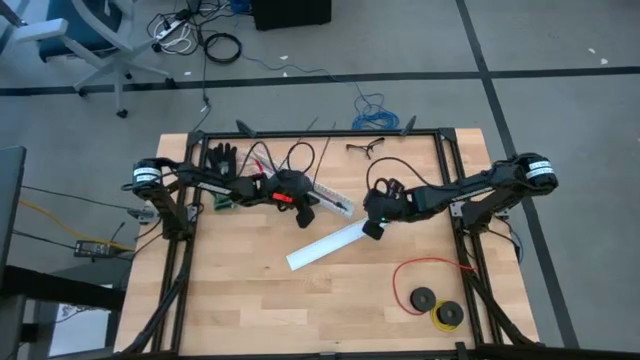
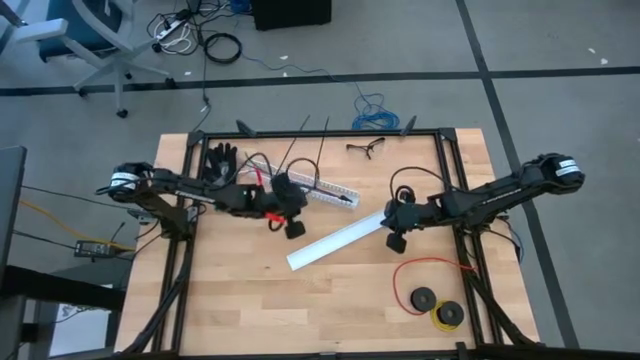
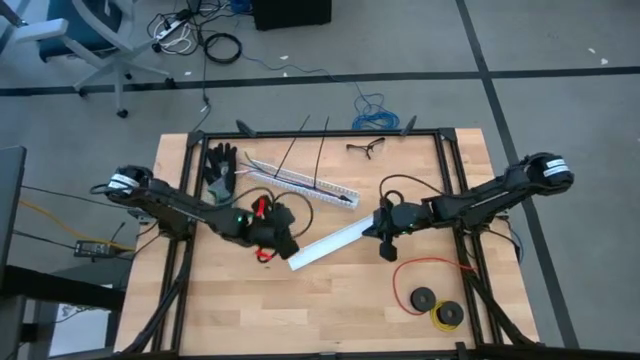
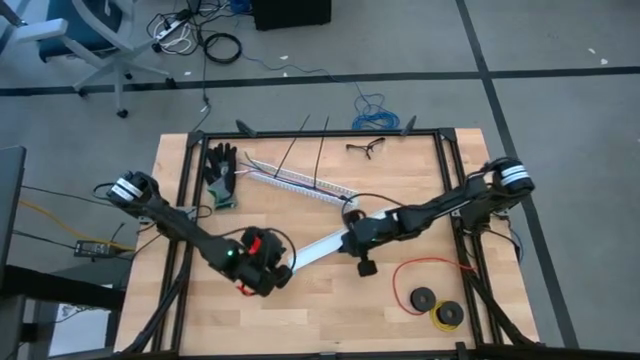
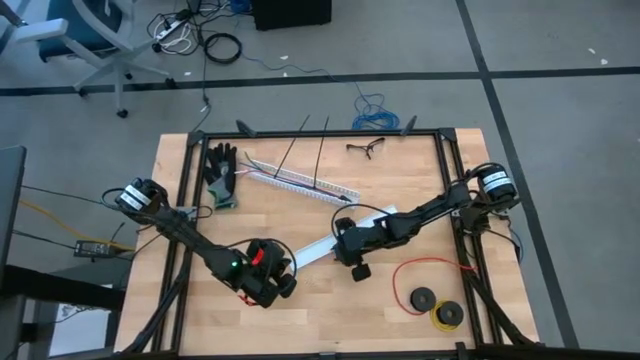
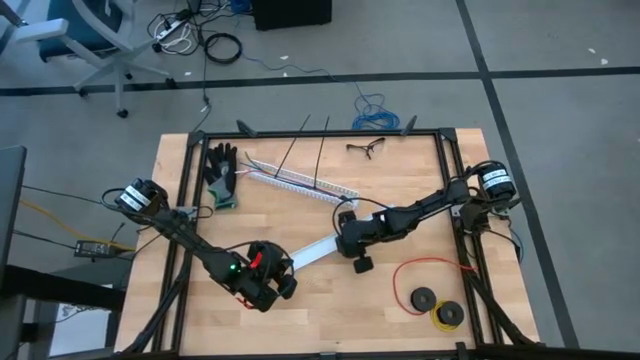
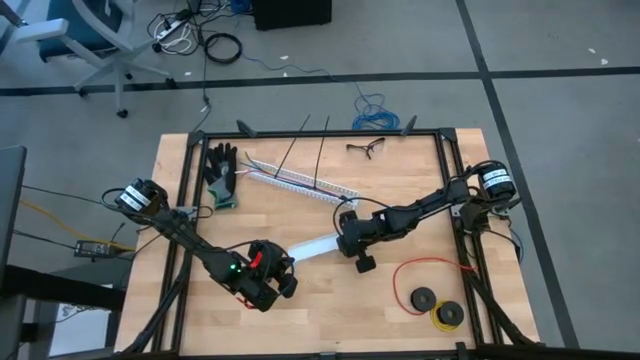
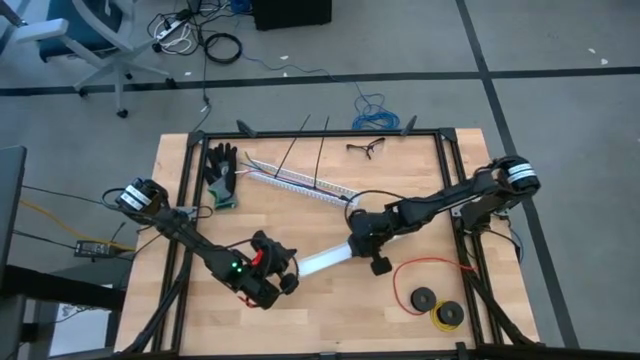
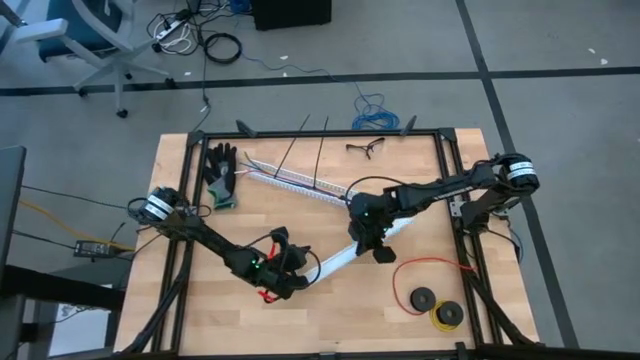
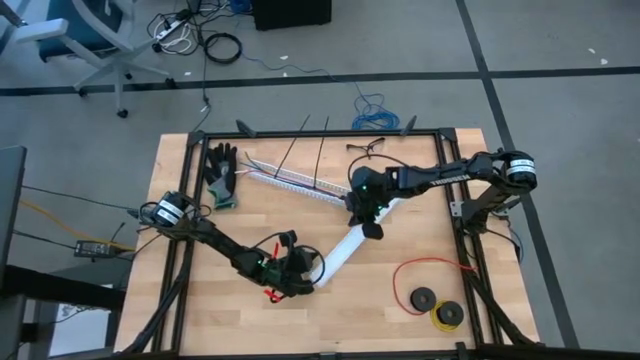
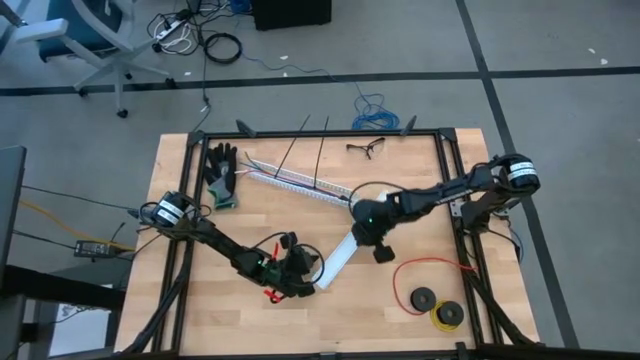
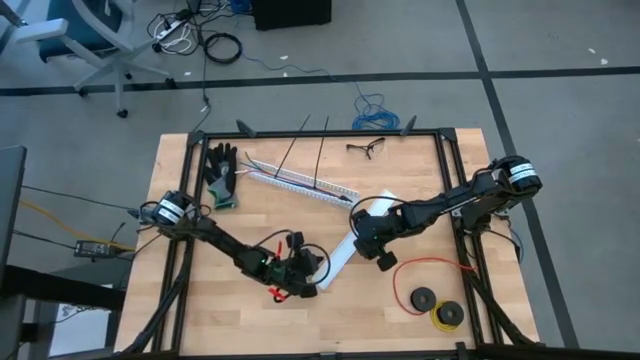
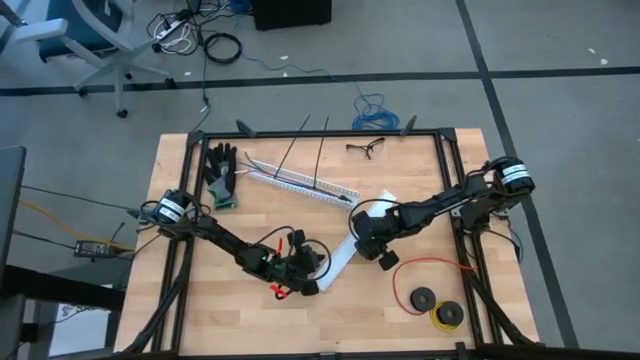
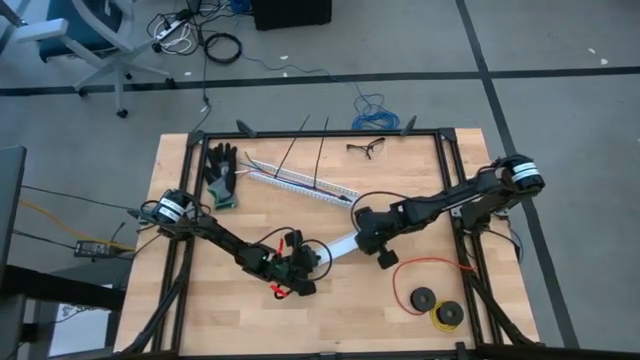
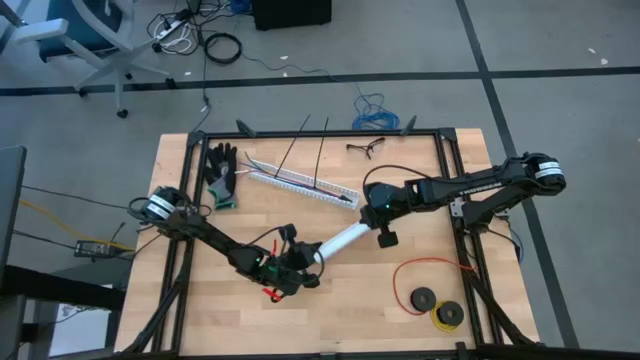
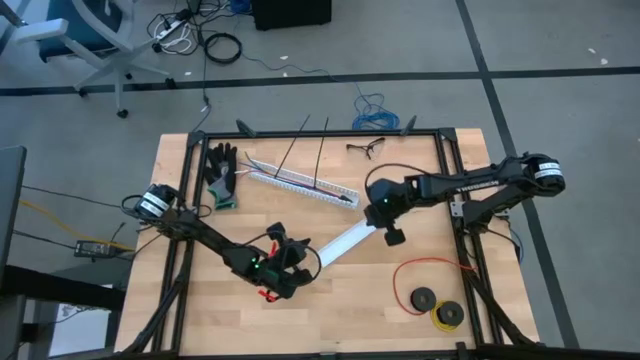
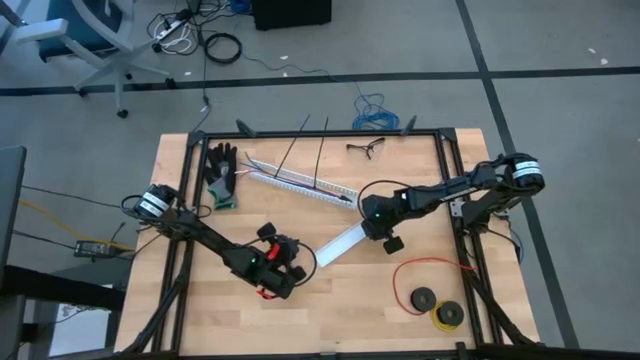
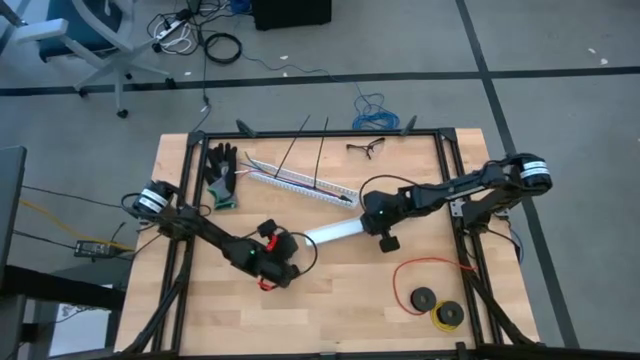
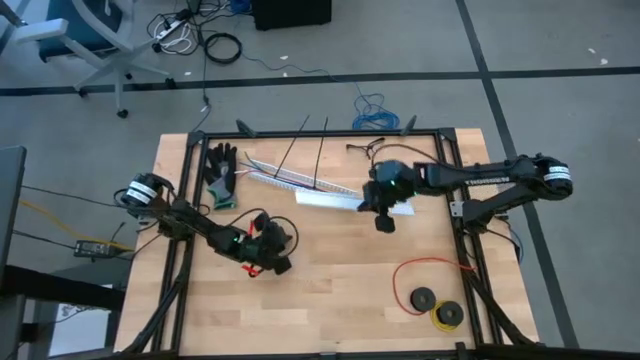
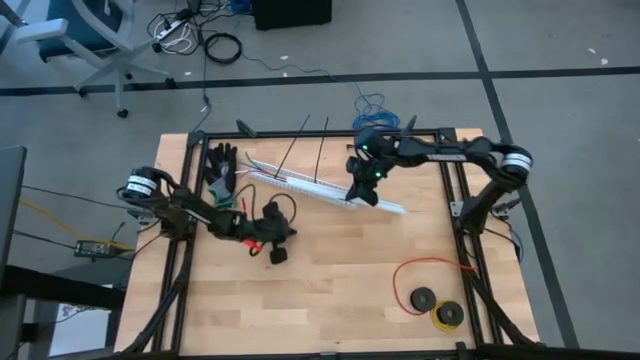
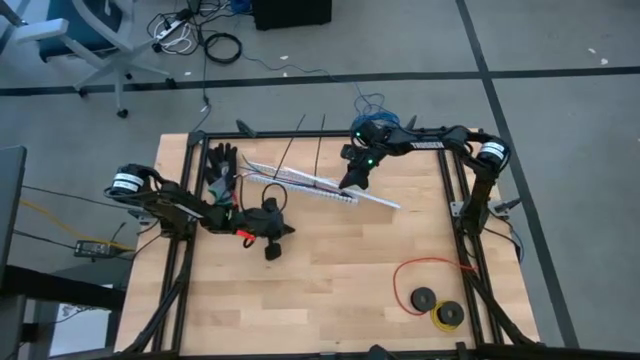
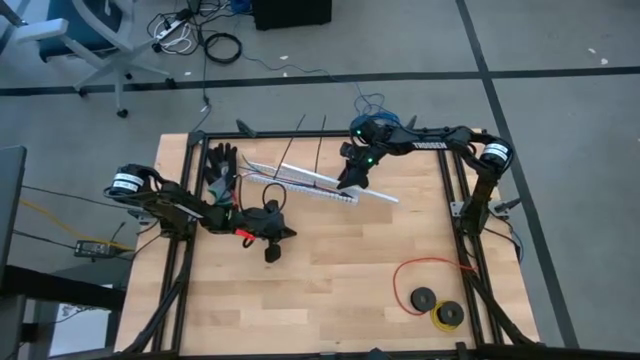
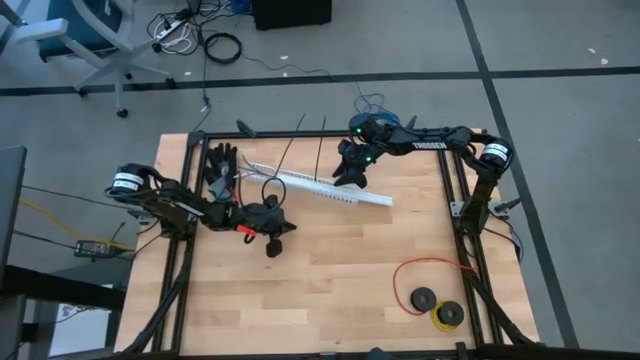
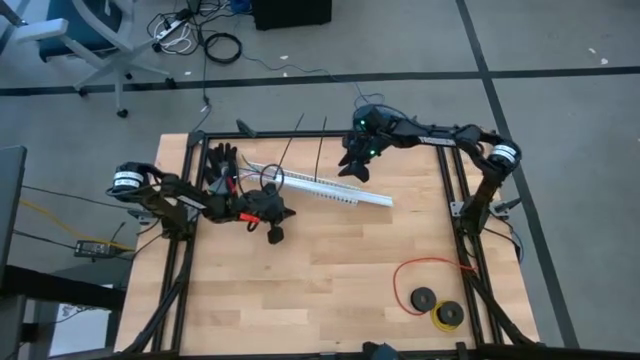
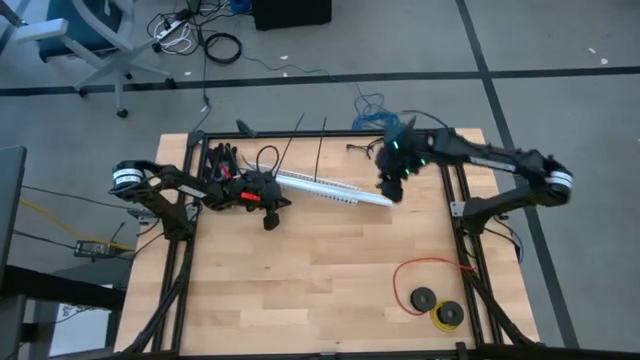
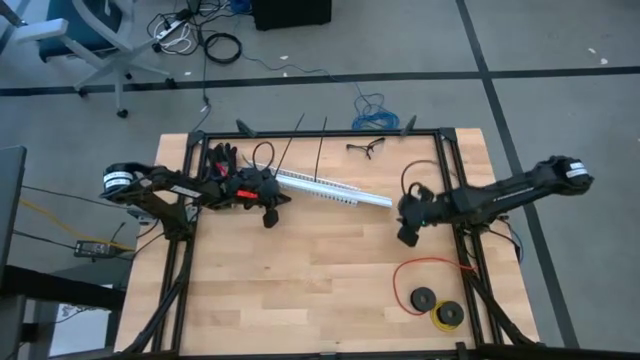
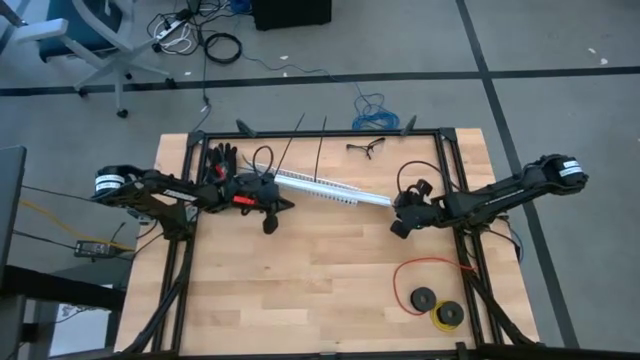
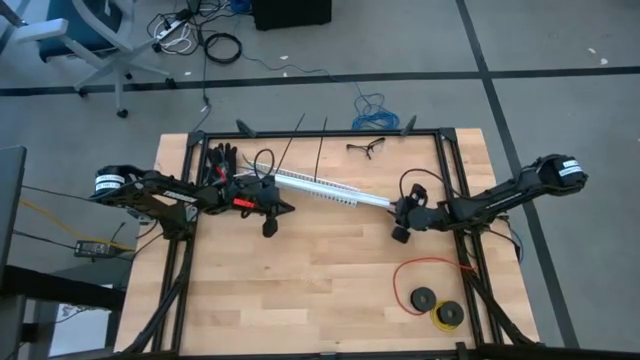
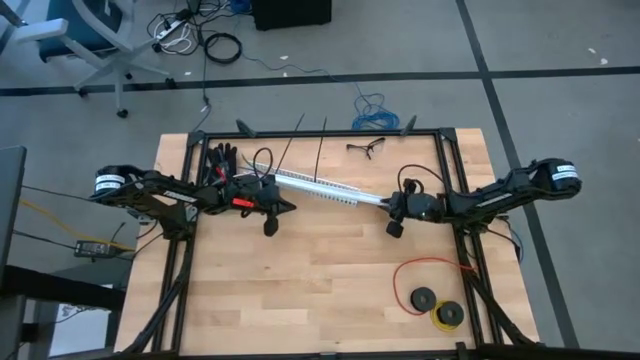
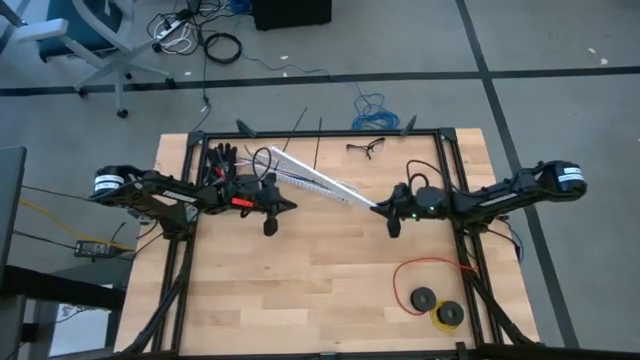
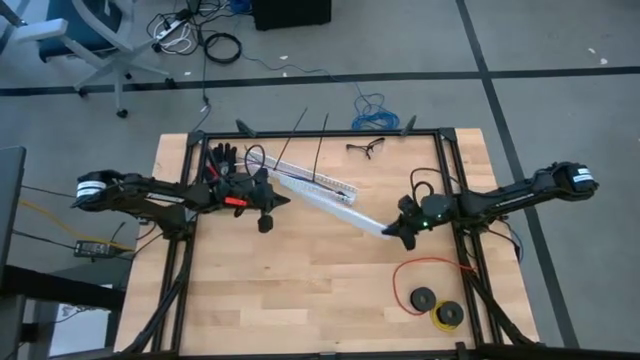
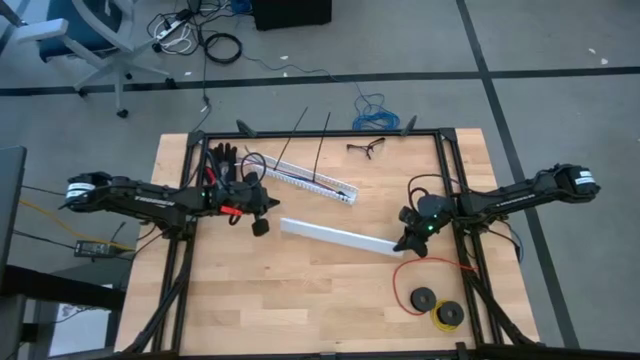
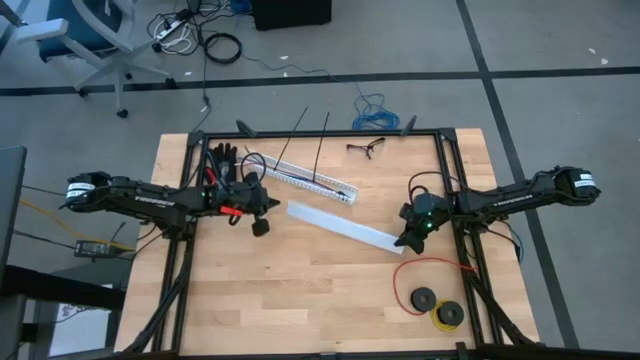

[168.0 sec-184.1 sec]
Task: Ziptie cables
Close the white cable duct

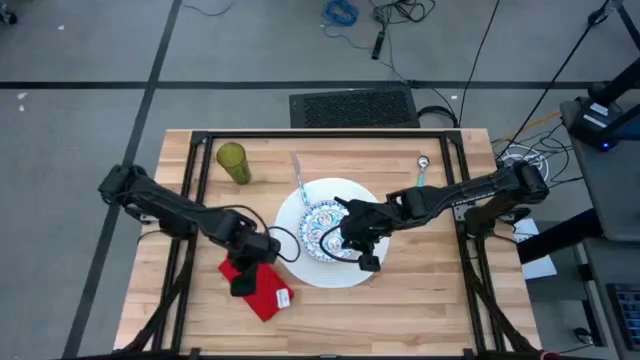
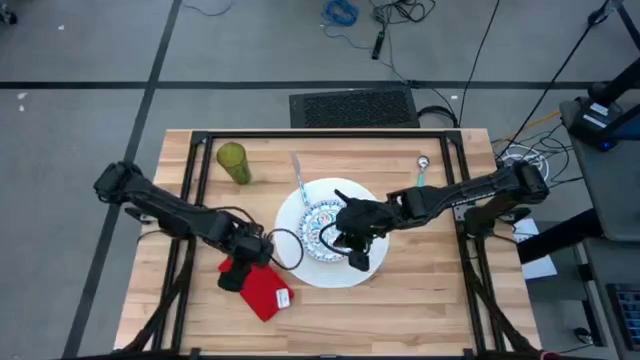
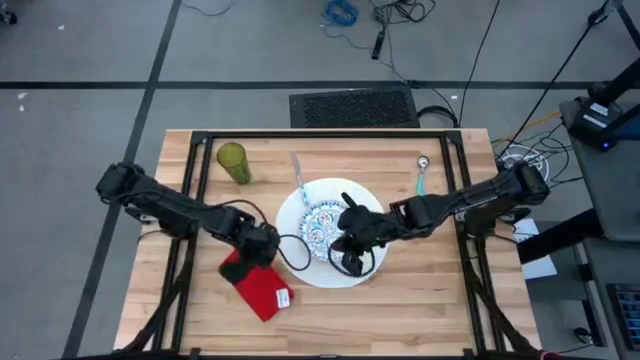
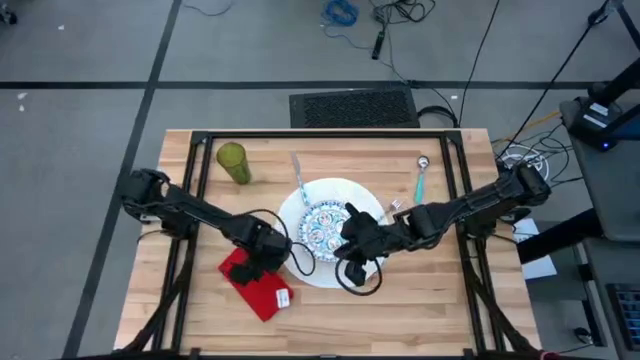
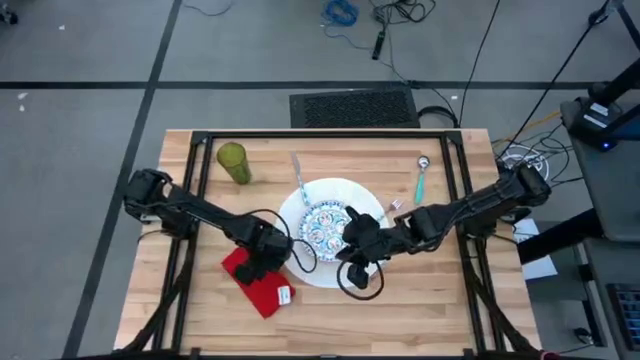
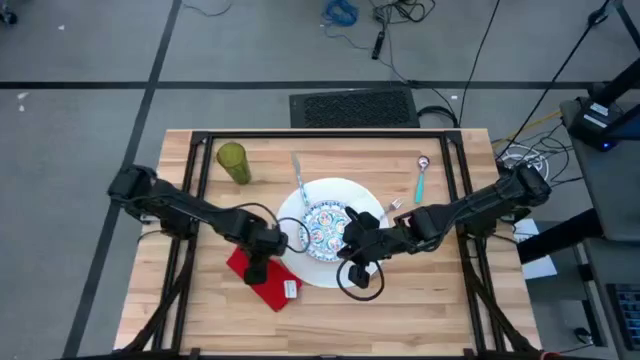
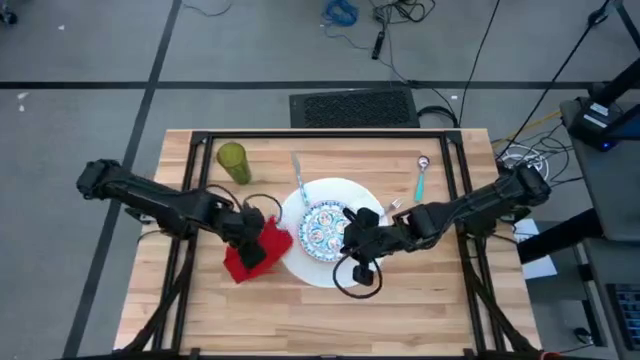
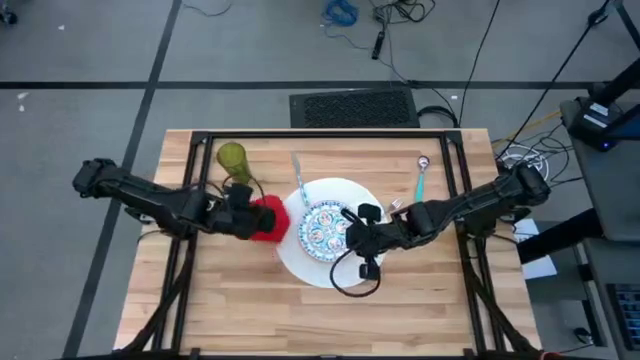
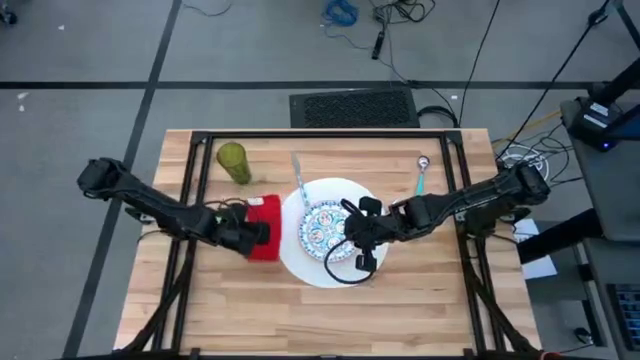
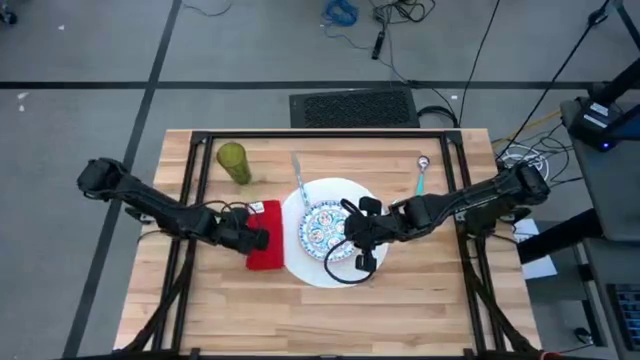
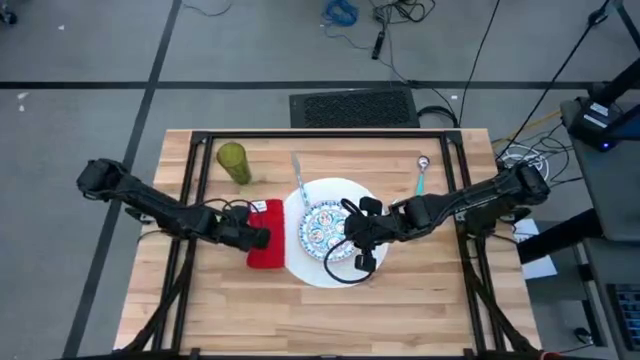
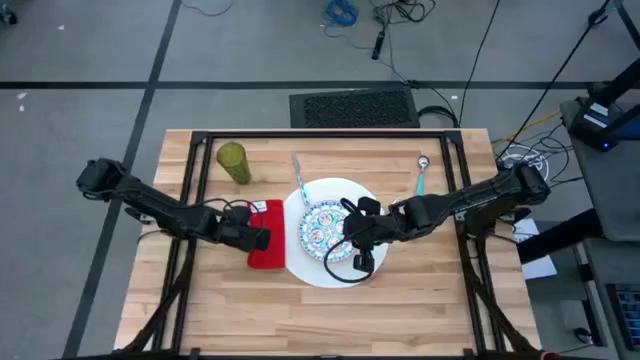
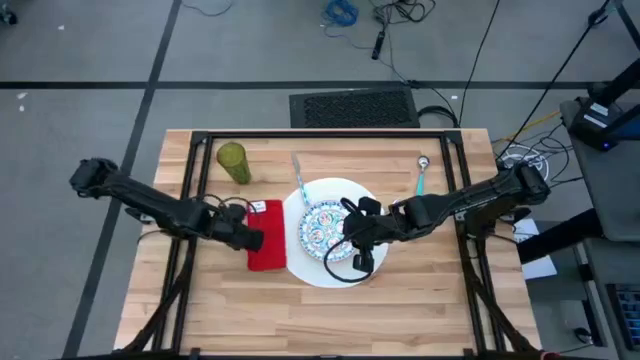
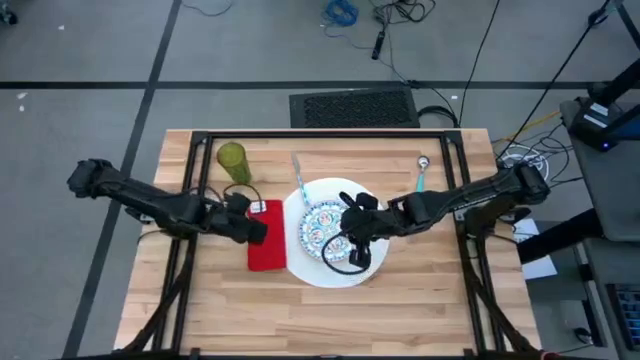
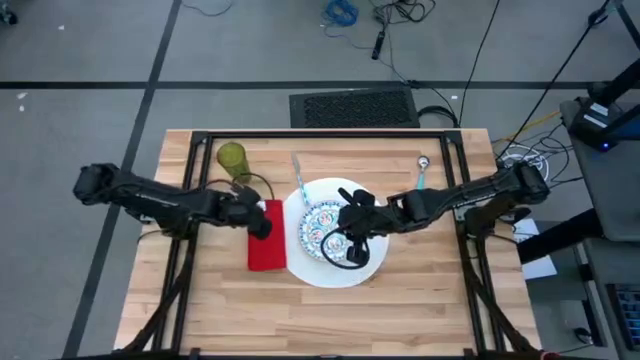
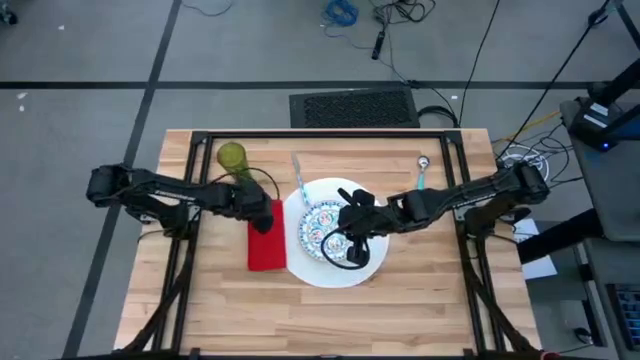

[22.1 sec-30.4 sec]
Task: Set table place
Put the red table napkin to the left of the blue patterned plate on the white tablemat
